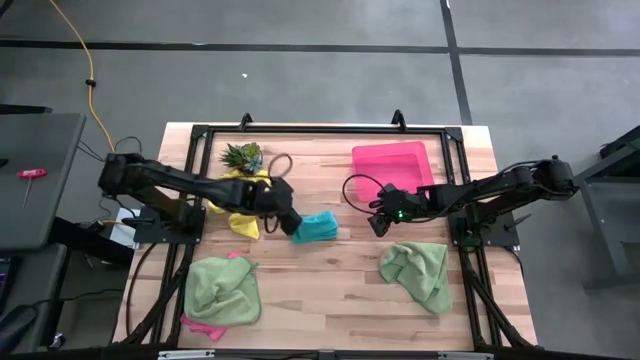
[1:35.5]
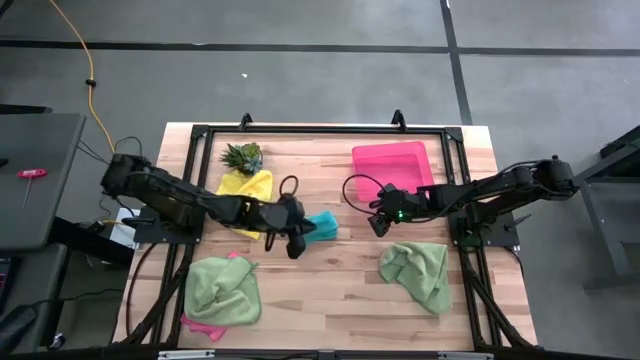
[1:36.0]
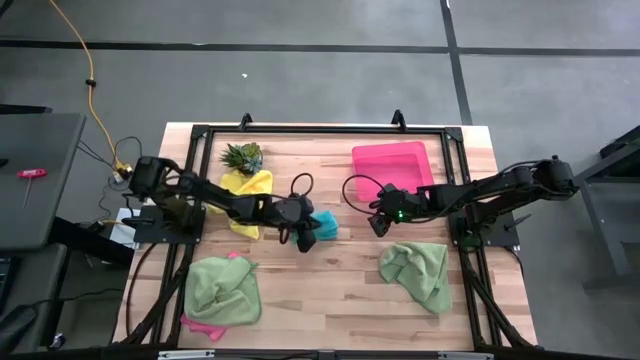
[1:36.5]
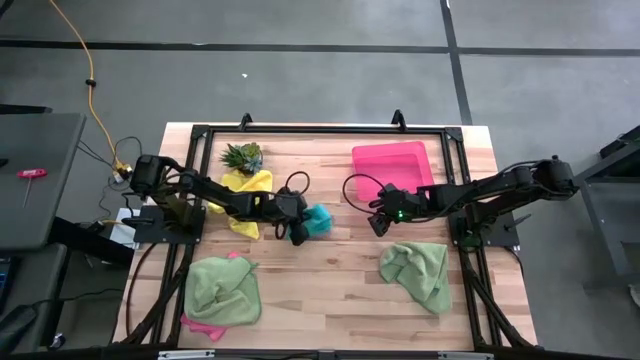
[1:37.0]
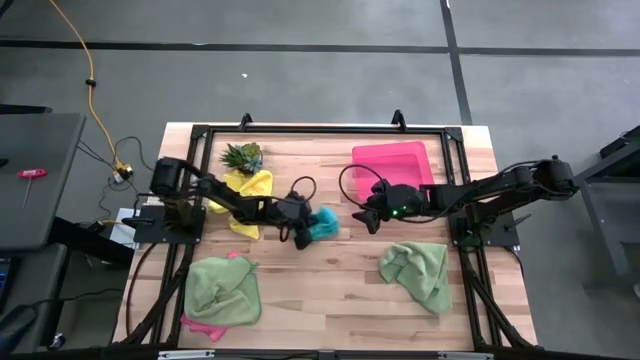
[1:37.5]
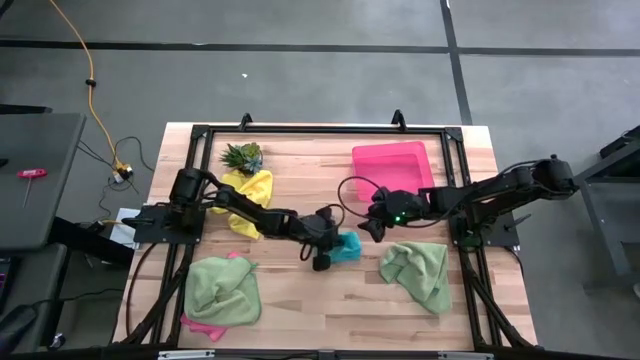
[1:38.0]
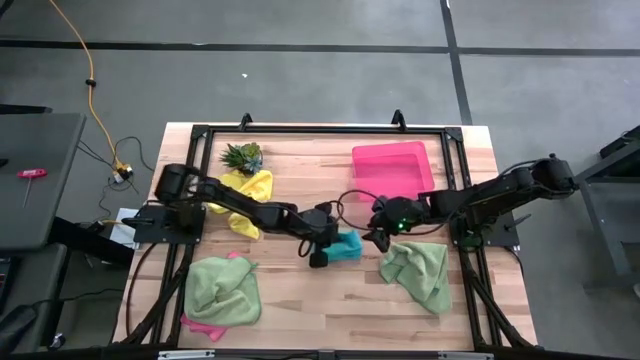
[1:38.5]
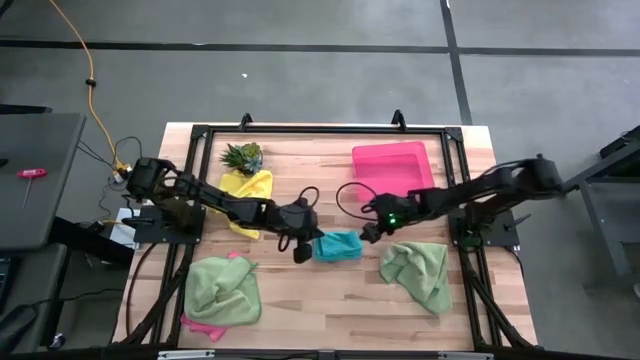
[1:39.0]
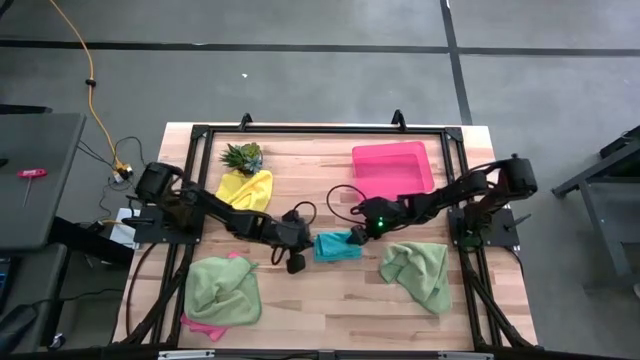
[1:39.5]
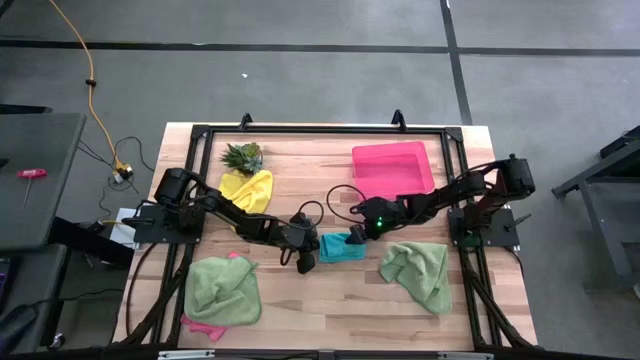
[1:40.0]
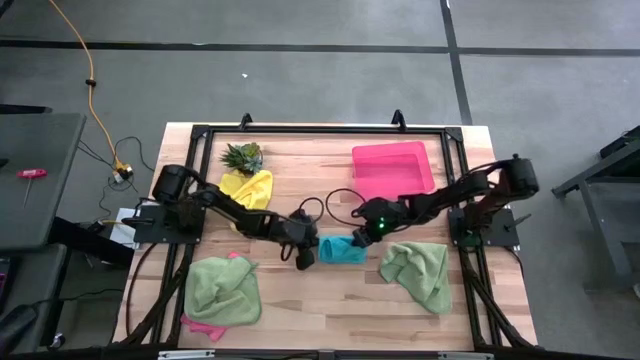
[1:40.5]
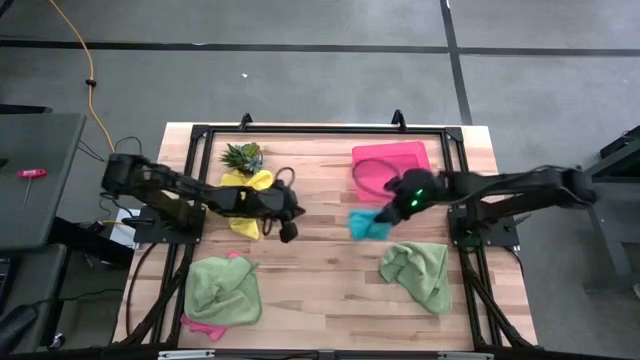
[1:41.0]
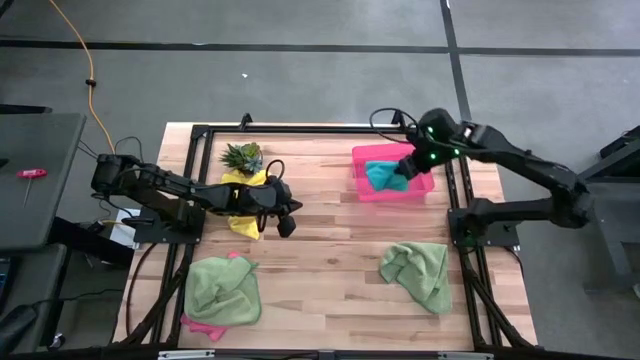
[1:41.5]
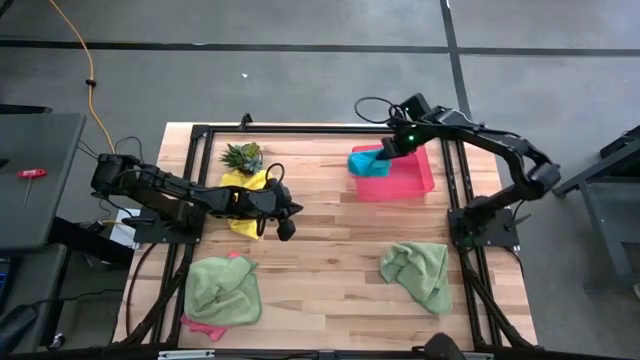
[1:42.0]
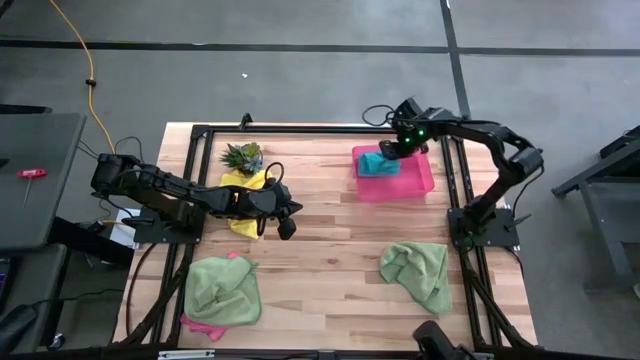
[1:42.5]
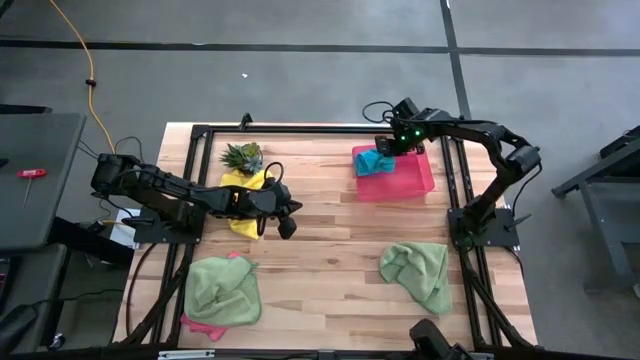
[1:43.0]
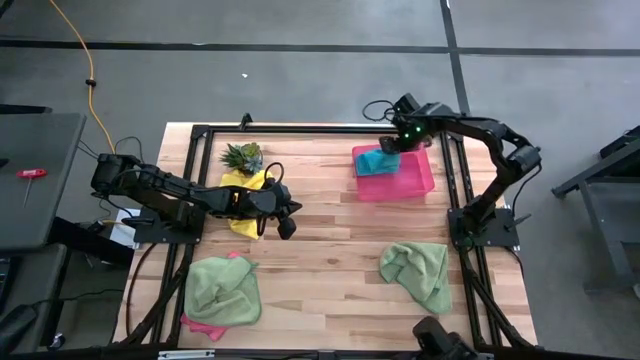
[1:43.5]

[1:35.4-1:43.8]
Task: Fold microfiber towels
Put the folded blue microfiber cloth into the pink bin
